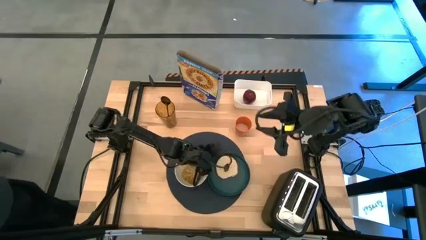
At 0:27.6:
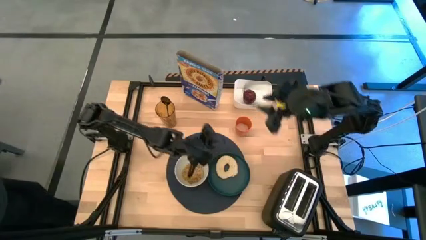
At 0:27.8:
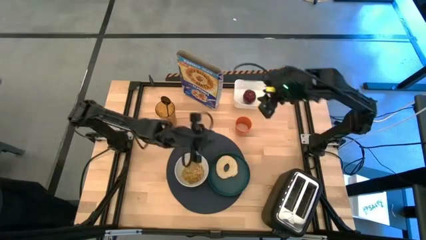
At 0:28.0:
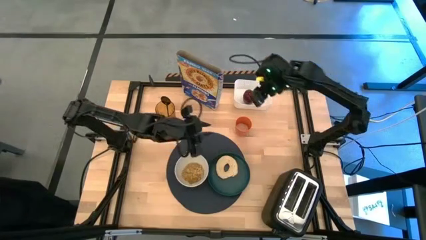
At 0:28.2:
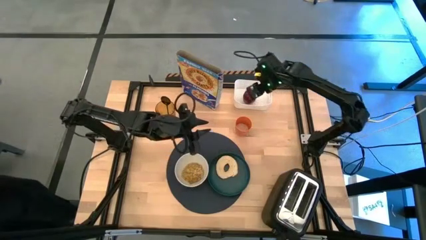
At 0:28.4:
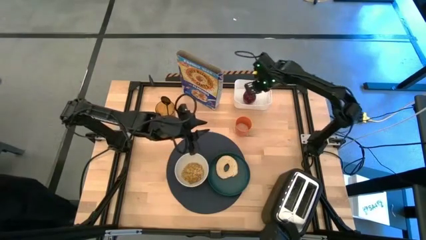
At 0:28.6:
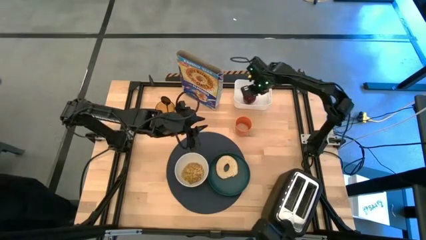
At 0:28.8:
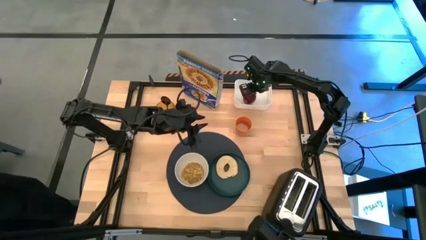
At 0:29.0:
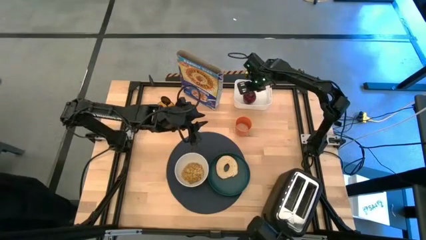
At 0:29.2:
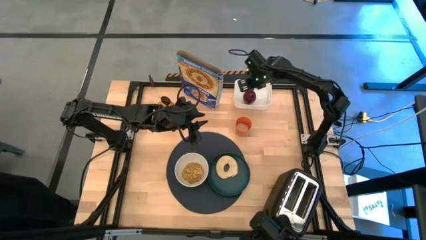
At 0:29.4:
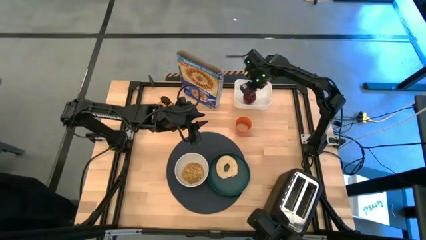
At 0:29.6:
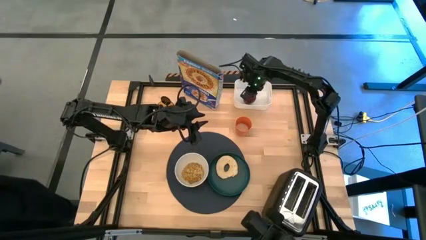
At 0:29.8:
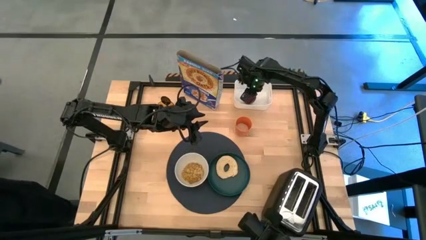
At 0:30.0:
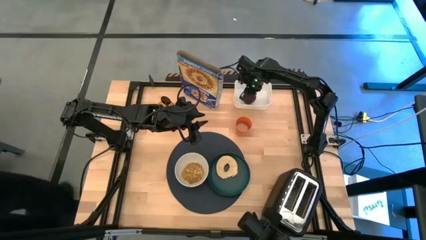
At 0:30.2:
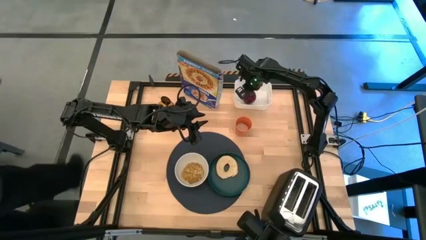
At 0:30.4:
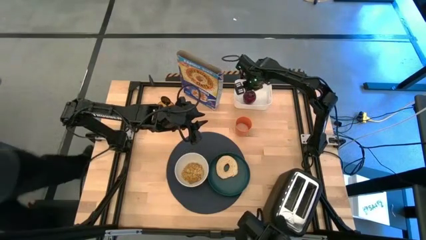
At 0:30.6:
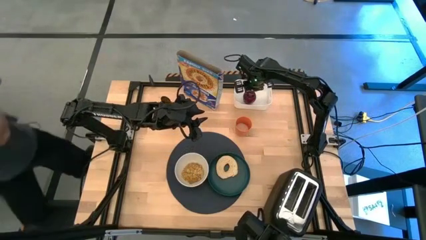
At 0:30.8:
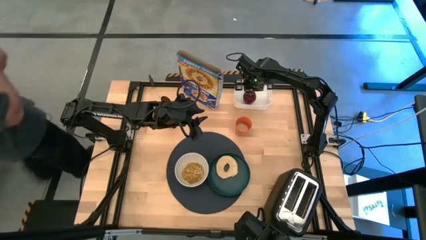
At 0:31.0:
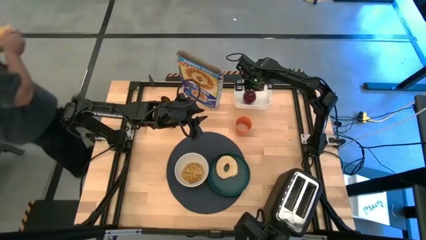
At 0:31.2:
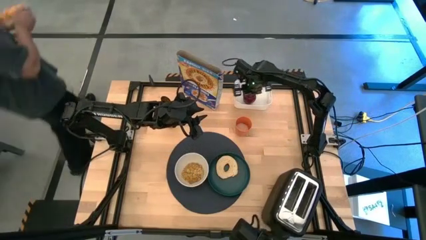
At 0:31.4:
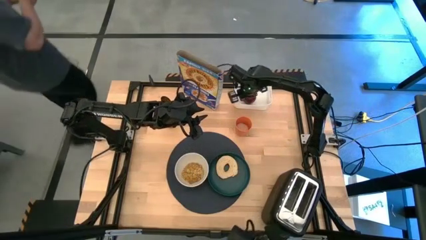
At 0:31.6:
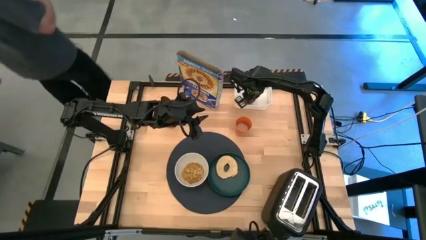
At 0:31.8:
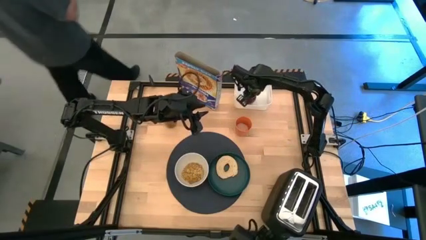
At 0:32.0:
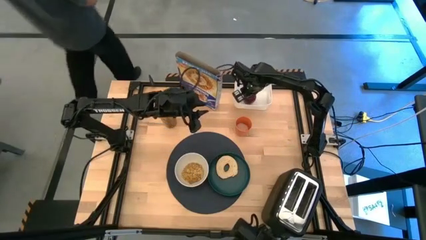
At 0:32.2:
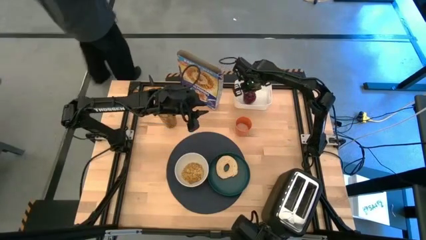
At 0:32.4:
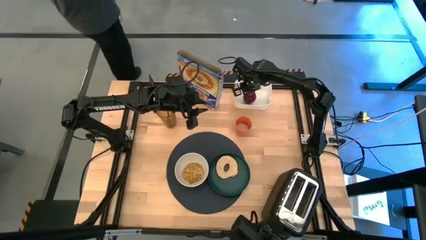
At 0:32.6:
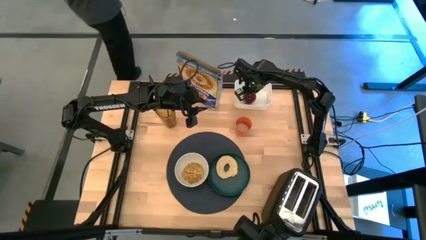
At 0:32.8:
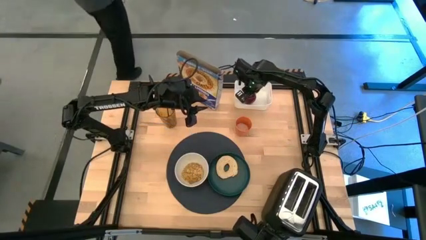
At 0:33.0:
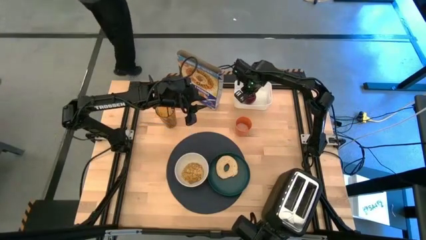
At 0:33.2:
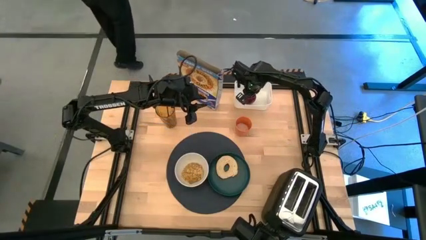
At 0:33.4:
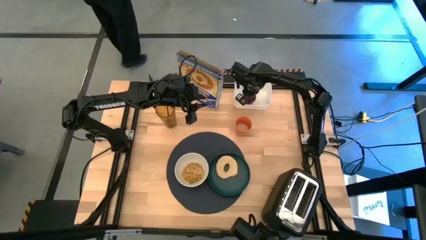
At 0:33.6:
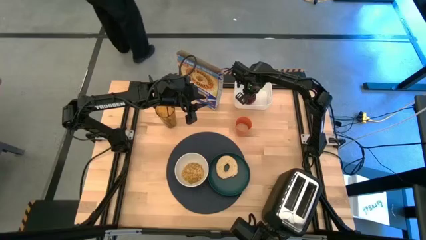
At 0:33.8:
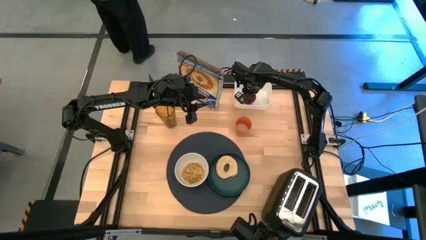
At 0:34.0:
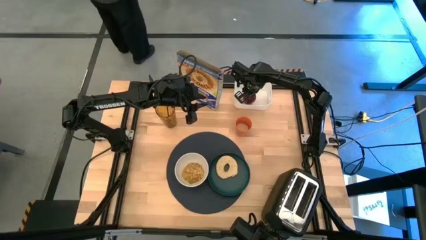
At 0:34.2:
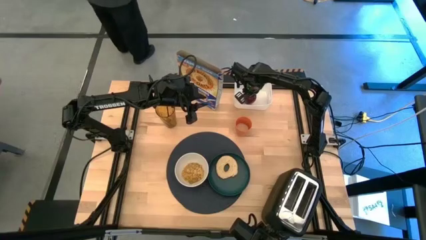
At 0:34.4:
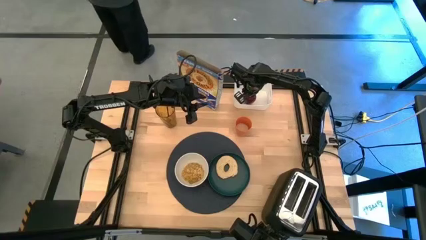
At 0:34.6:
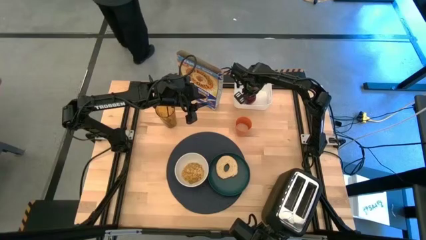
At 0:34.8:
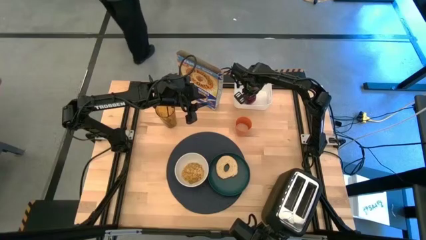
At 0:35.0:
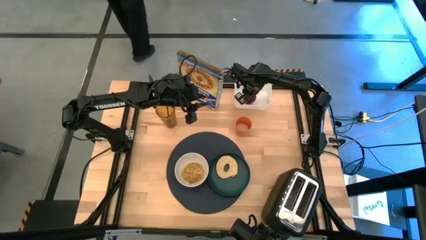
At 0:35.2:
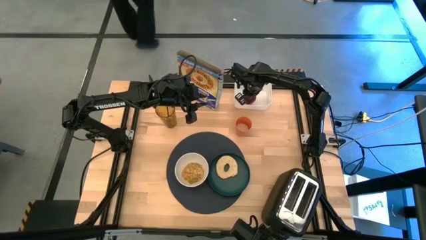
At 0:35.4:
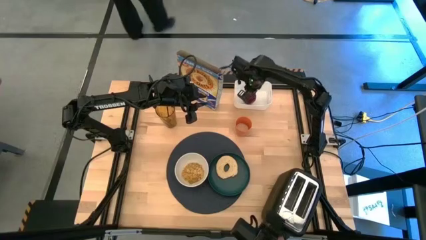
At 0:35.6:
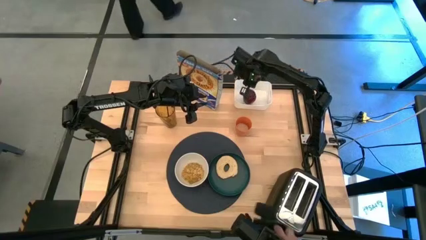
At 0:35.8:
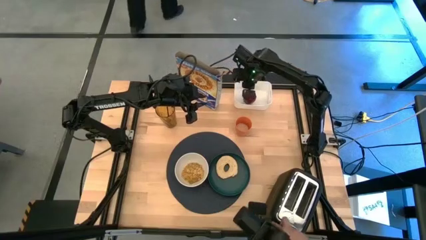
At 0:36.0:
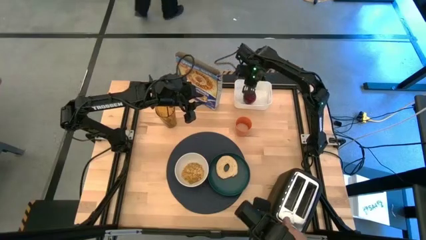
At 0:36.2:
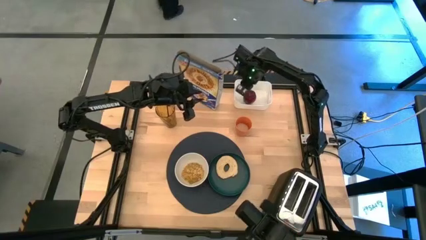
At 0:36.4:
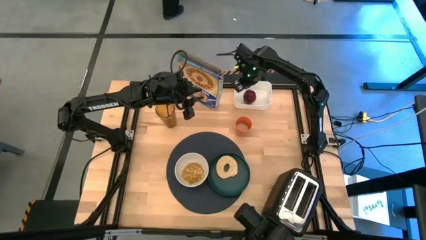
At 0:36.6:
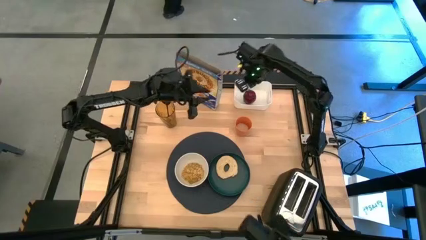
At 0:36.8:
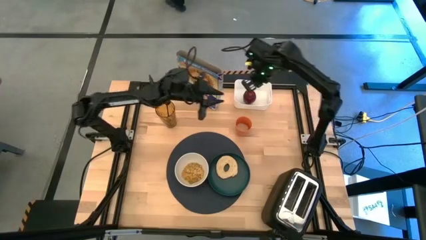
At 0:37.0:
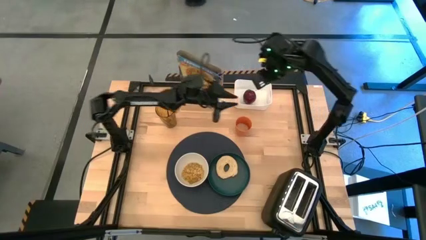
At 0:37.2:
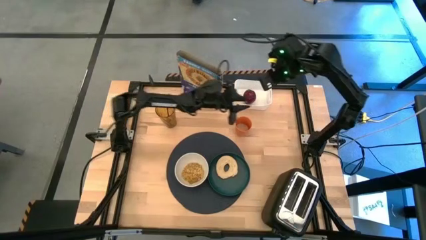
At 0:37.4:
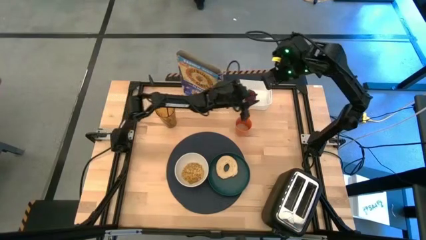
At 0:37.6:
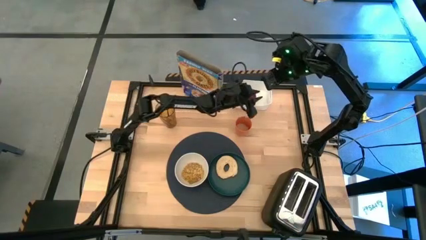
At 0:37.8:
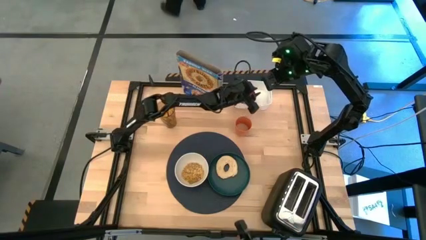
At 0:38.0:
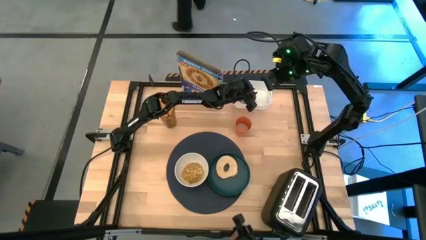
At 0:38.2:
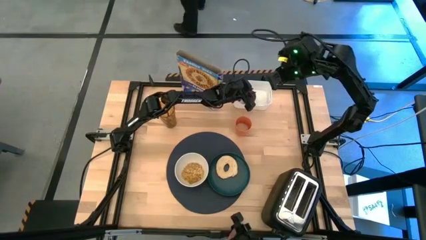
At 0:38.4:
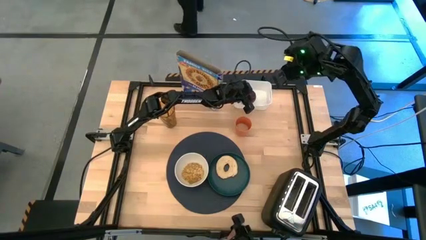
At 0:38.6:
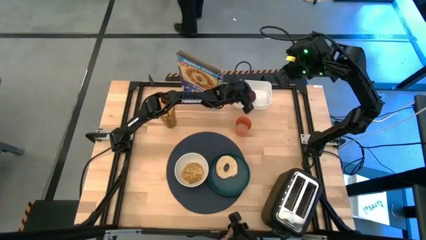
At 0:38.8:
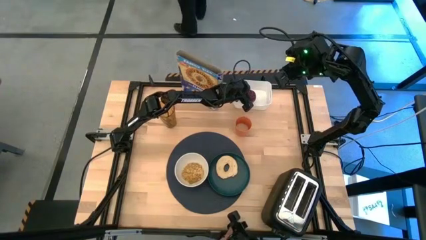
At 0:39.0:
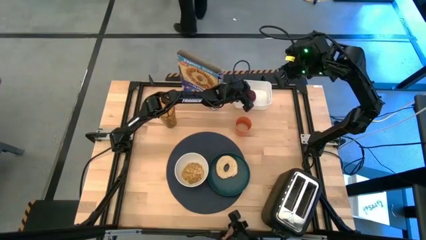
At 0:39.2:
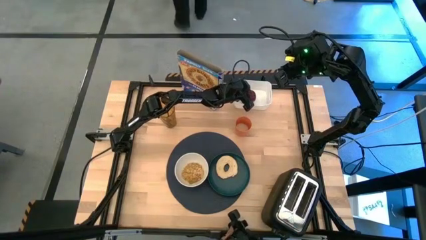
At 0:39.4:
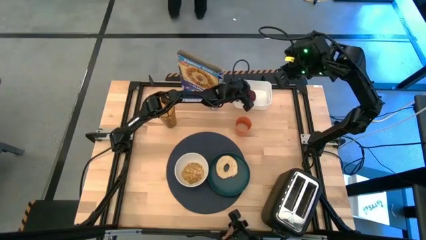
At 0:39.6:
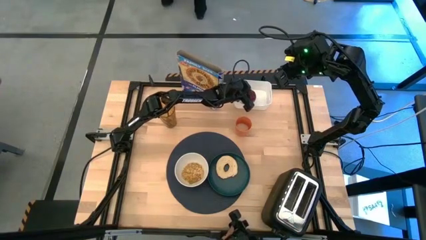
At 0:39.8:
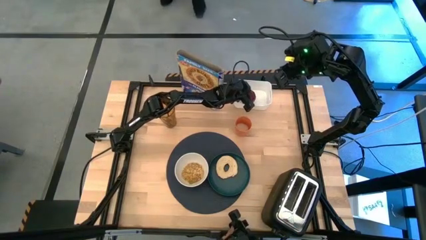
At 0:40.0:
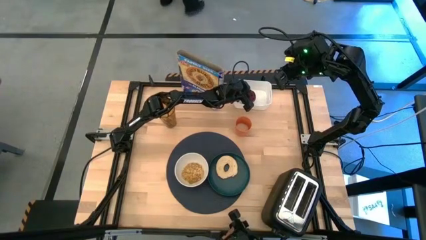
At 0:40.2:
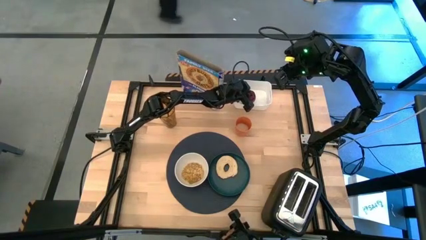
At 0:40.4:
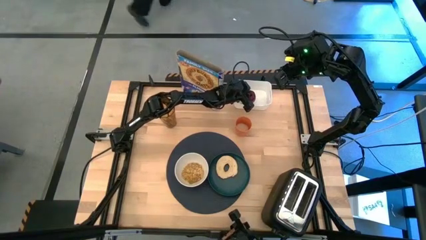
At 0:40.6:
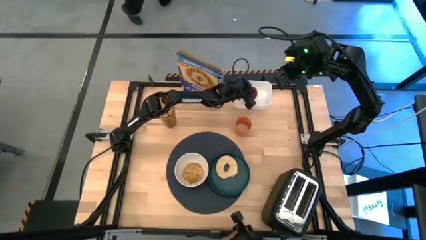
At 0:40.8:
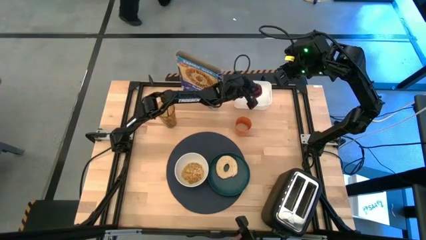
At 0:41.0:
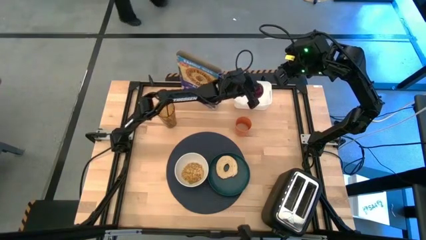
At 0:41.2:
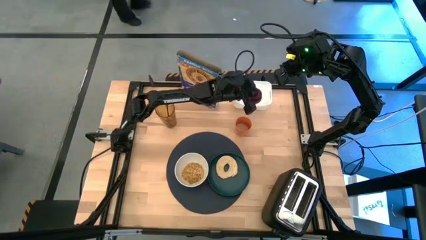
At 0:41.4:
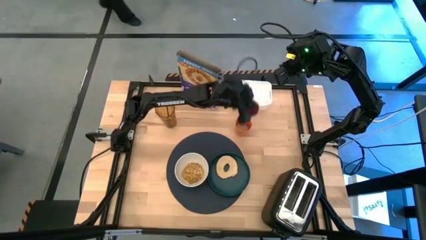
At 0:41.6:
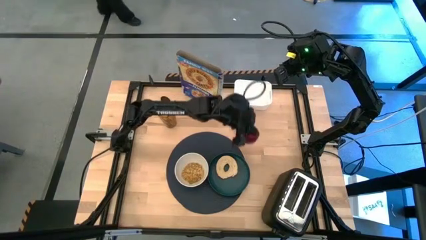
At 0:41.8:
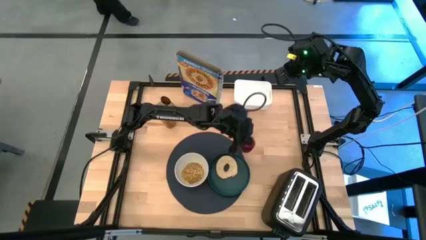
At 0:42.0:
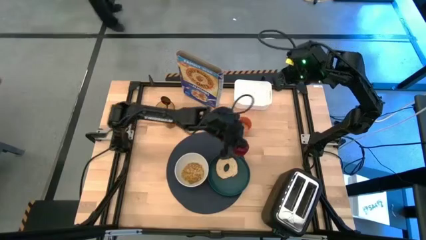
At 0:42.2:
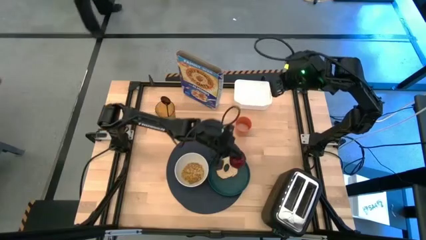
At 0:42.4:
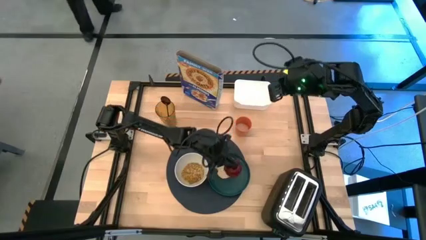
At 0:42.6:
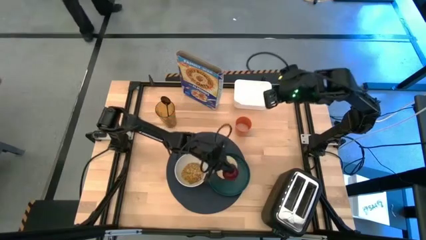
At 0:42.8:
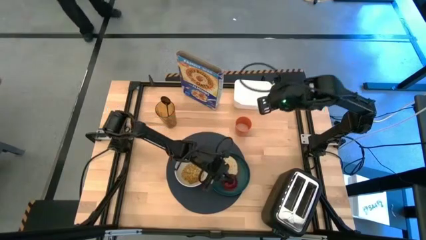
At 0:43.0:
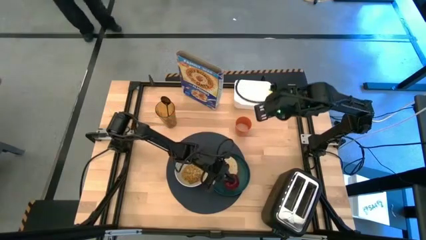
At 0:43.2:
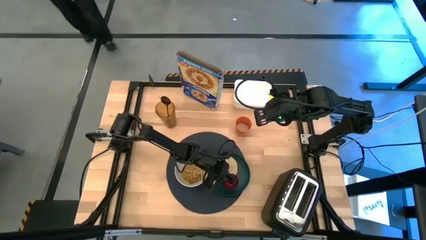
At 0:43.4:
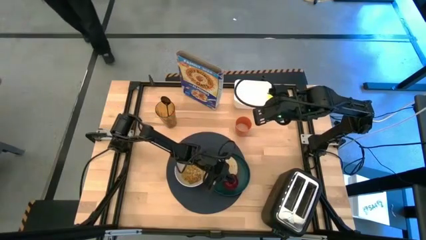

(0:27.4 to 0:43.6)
Task: Arrange a breakfast setting
Put the apple from the white bin on the green plate
